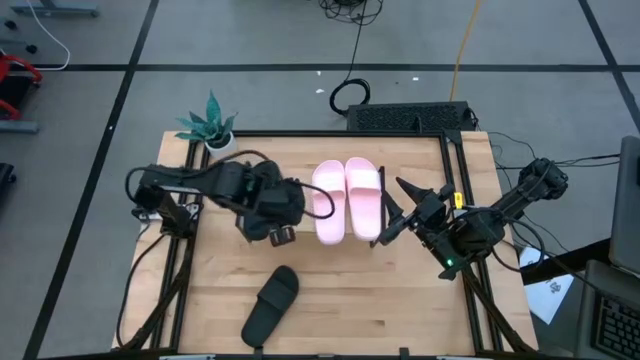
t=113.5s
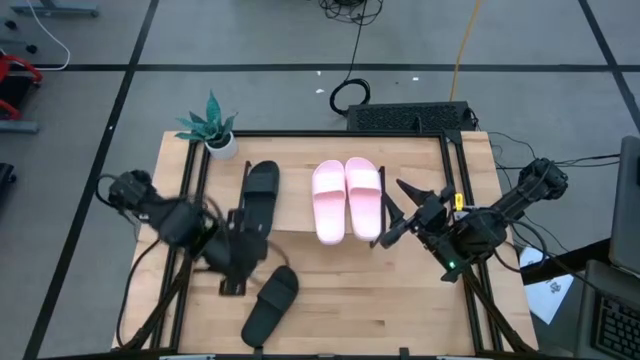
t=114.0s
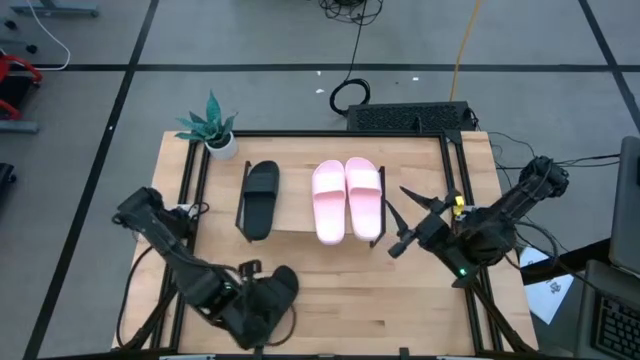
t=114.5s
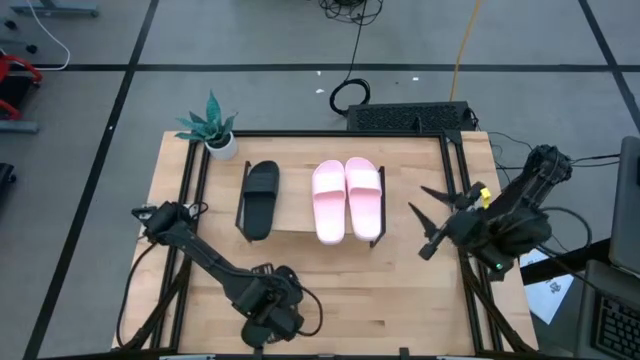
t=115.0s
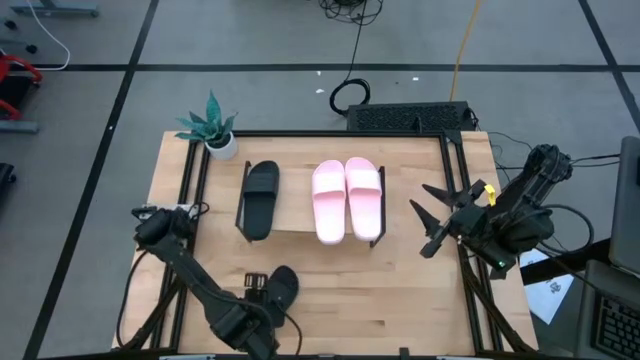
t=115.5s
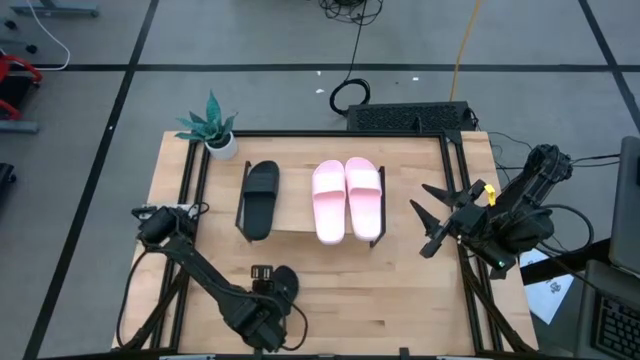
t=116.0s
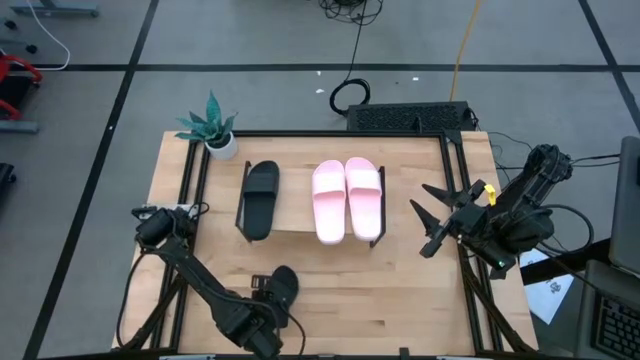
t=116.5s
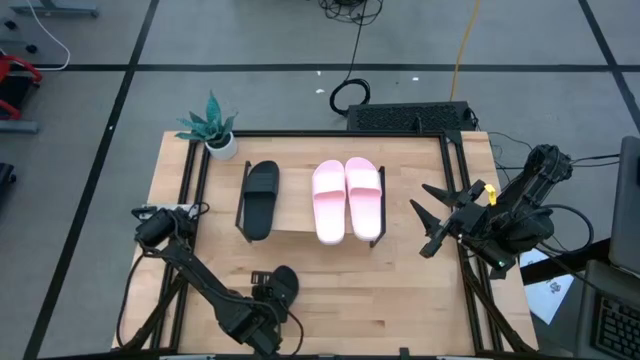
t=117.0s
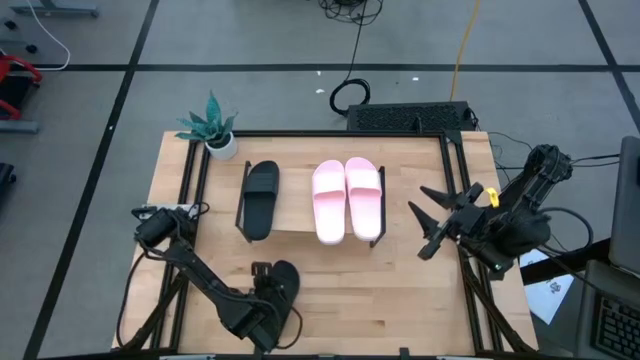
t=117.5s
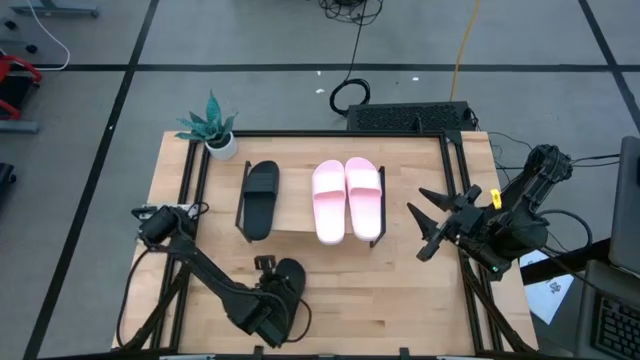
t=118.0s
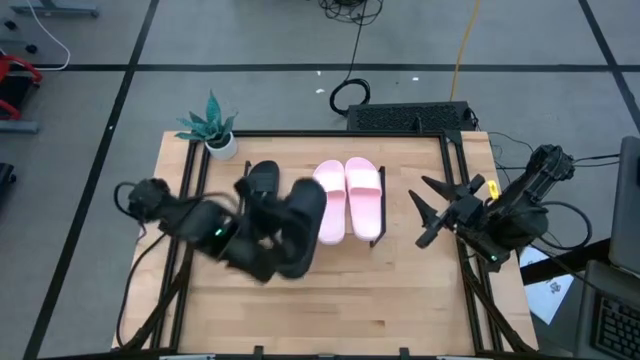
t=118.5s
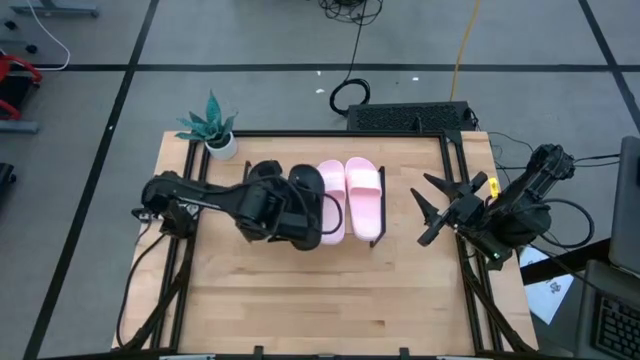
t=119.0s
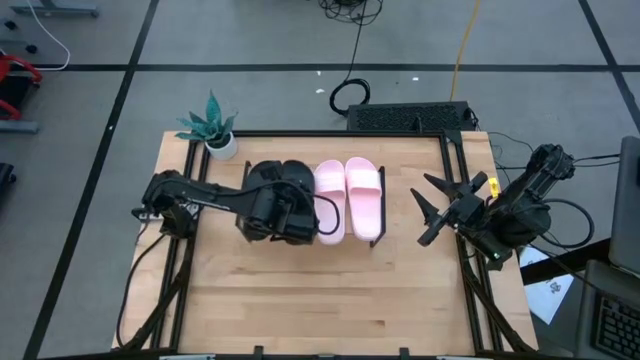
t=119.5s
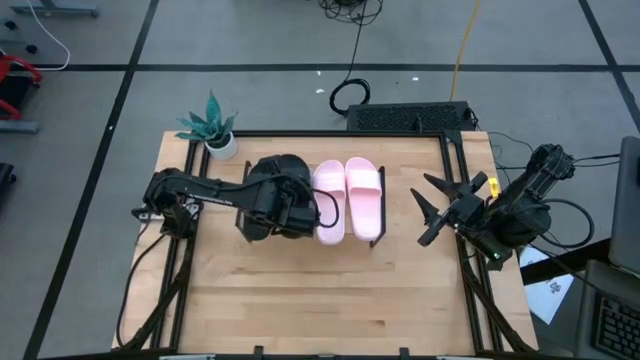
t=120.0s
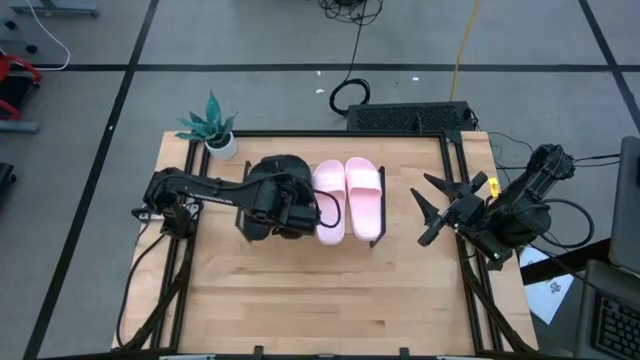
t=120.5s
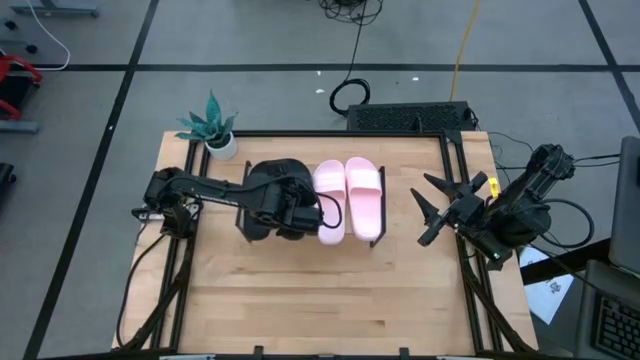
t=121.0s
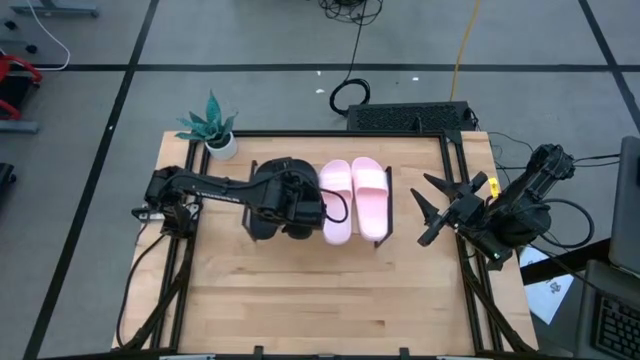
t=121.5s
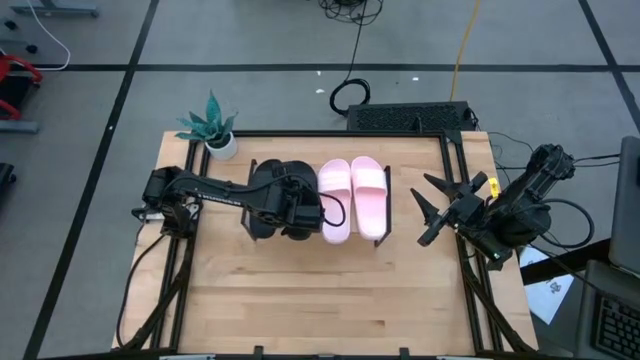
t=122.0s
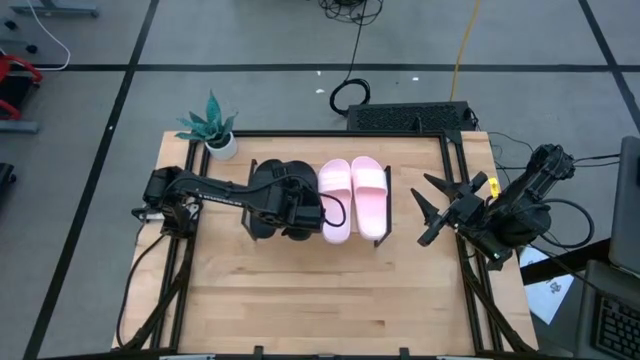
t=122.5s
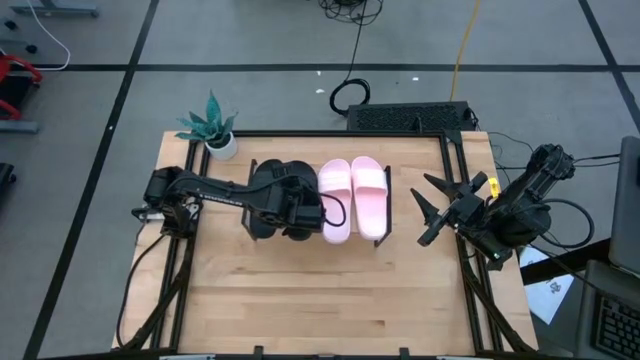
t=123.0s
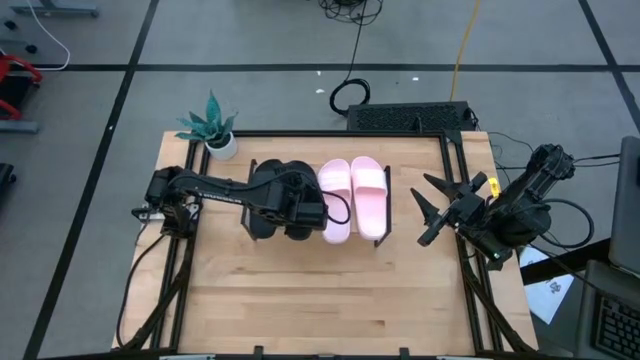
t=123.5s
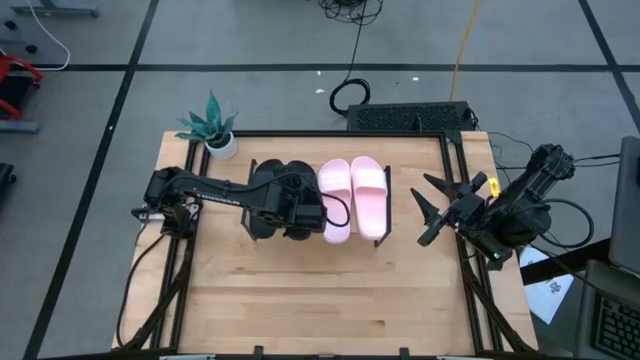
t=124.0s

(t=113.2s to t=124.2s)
Task: Pick and place slides into the shelf
Put the black slipper on the shelf

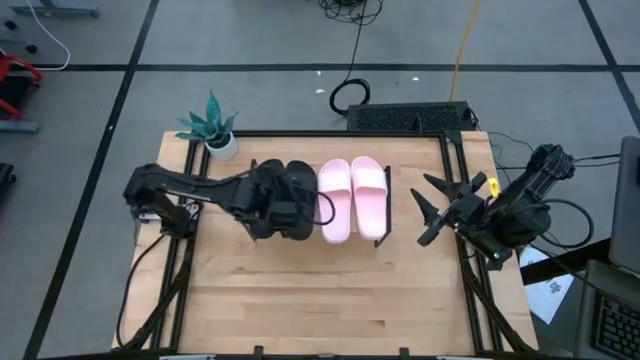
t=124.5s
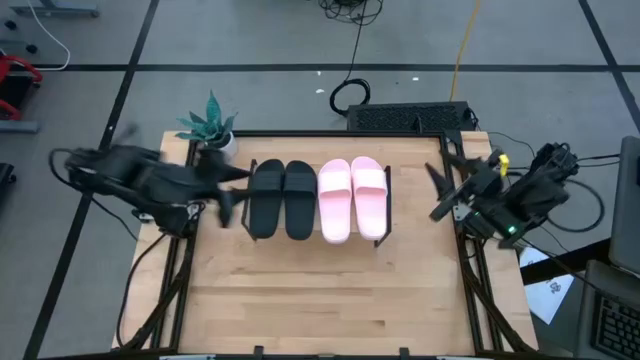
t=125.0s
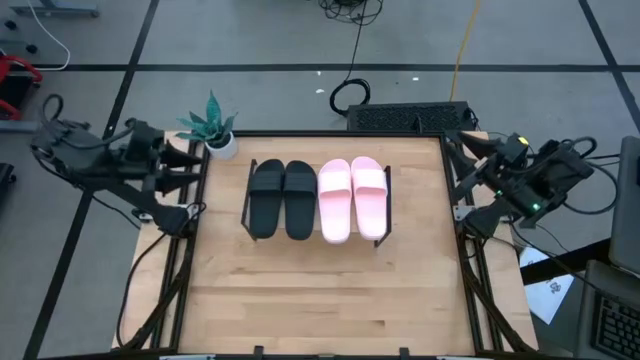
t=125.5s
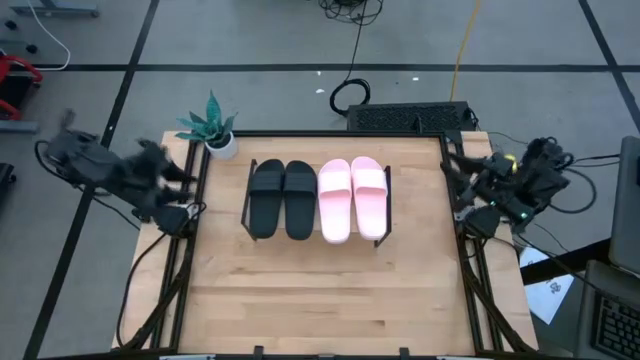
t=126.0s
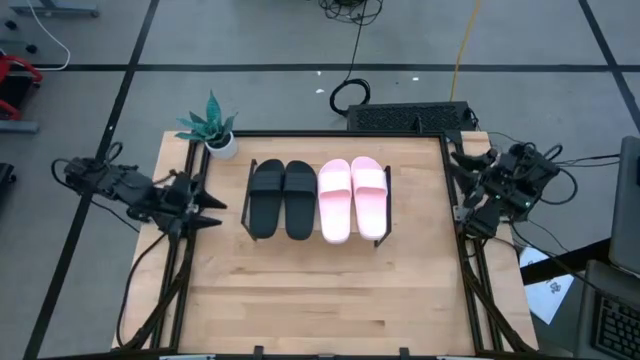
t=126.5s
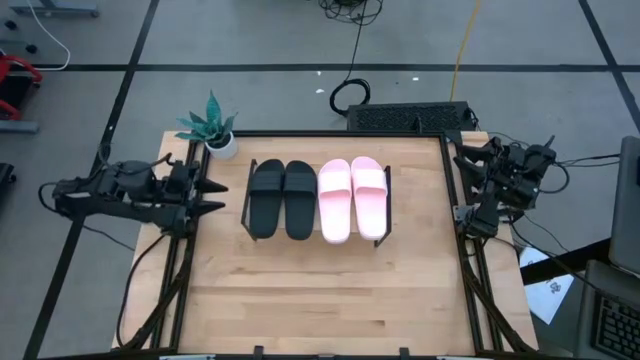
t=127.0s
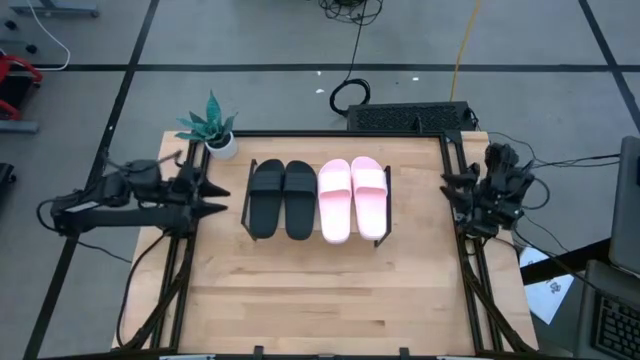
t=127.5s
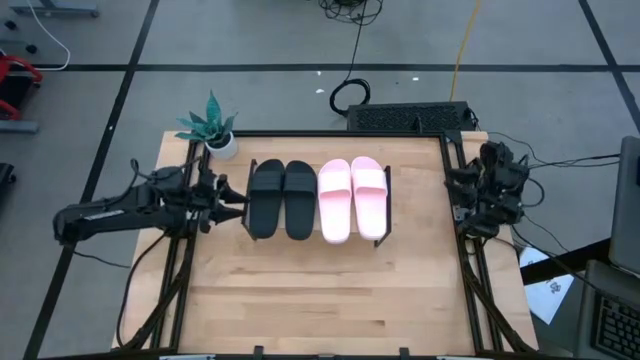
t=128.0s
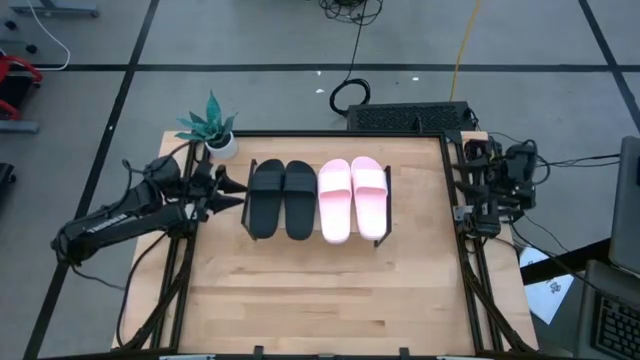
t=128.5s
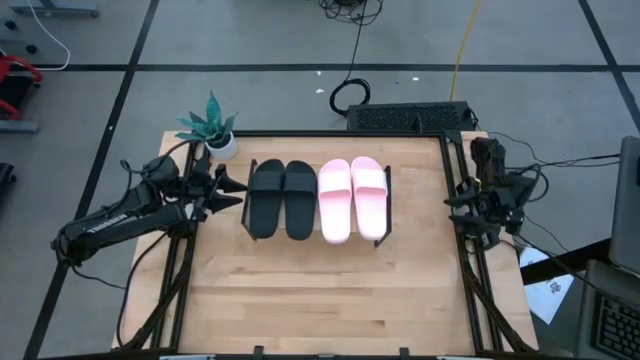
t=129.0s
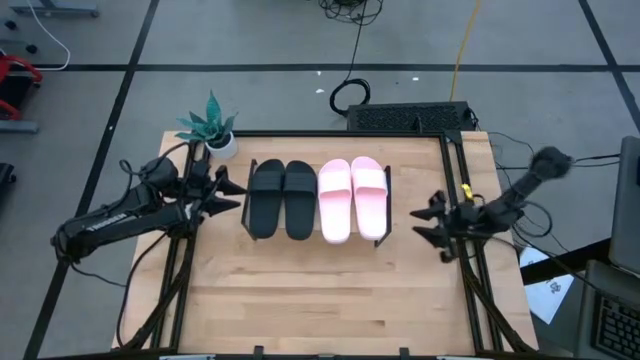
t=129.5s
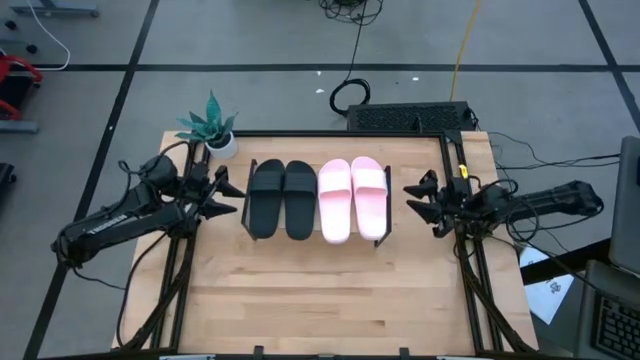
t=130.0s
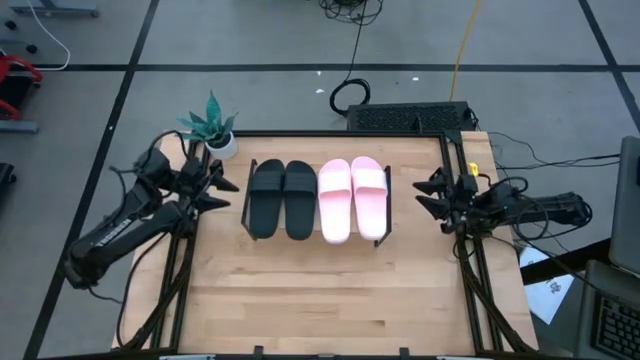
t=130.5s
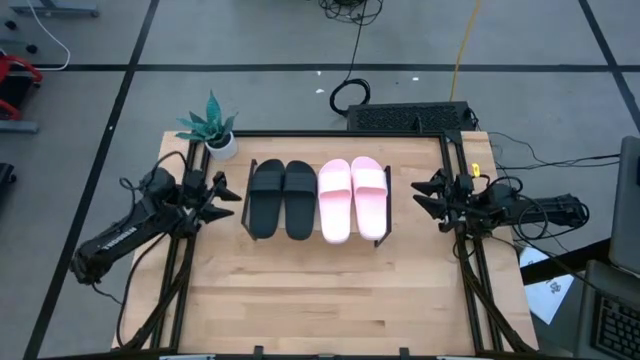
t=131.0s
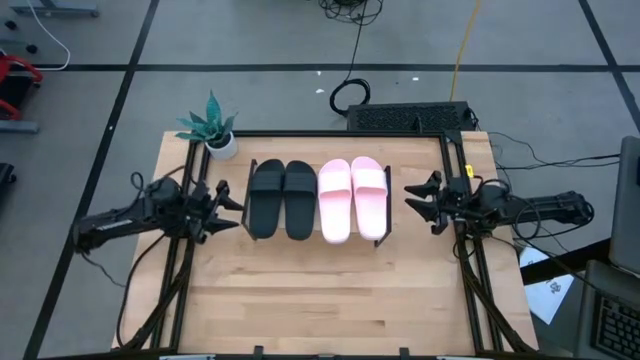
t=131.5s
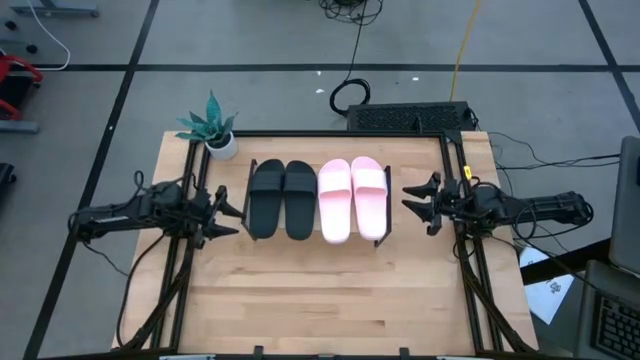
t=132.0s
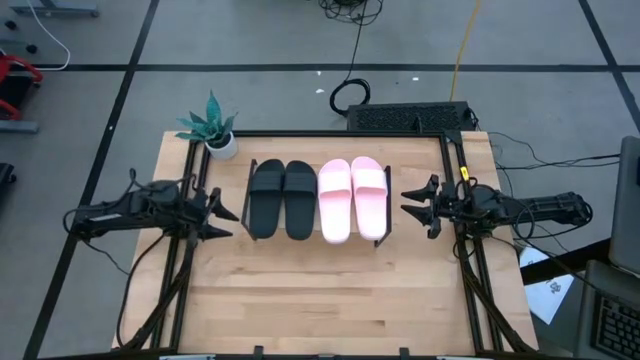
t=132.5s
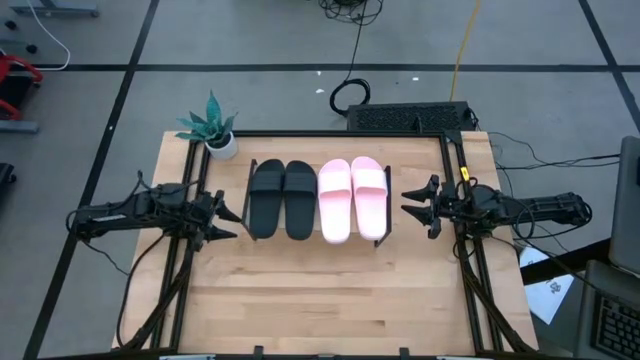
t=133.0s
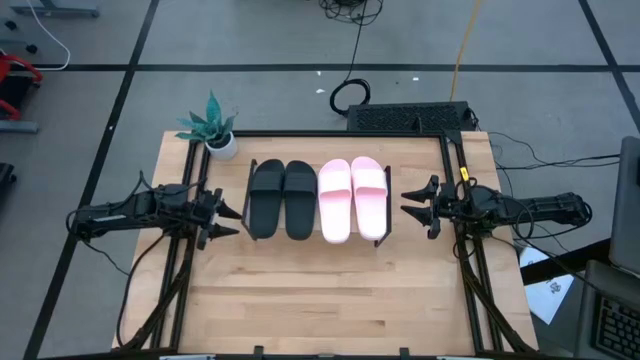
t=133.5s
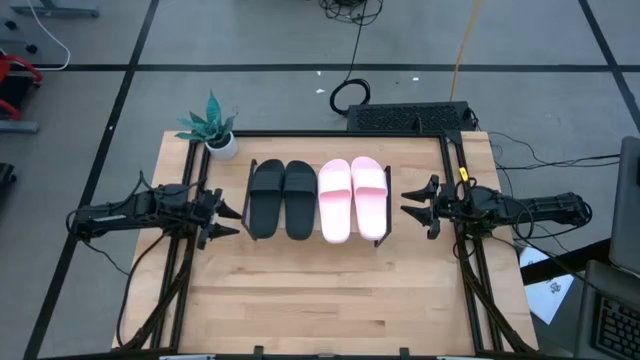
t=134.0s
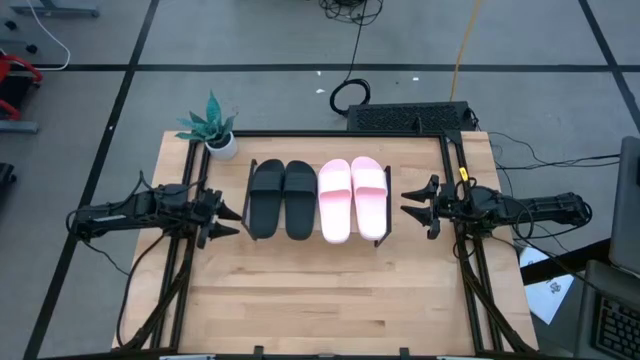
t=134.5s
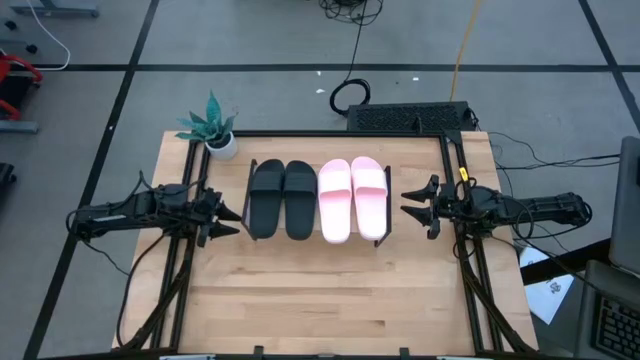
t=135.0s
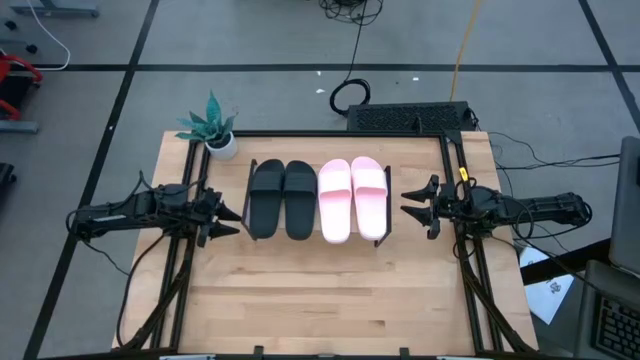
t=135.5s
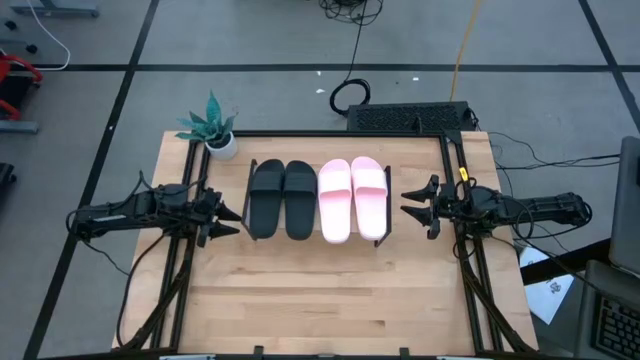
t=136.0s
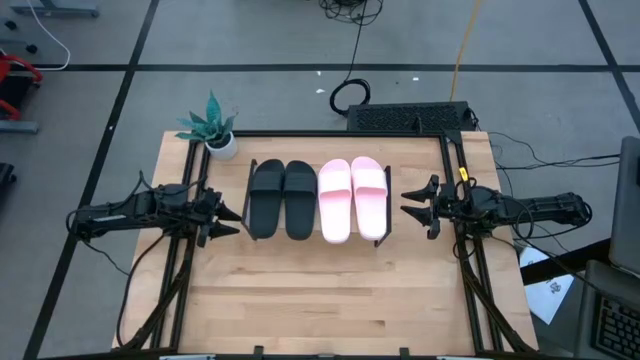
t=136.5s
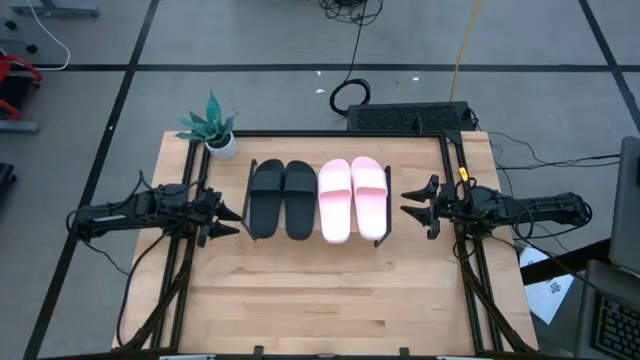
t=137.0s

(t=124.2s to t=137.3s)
Return to Home Position
